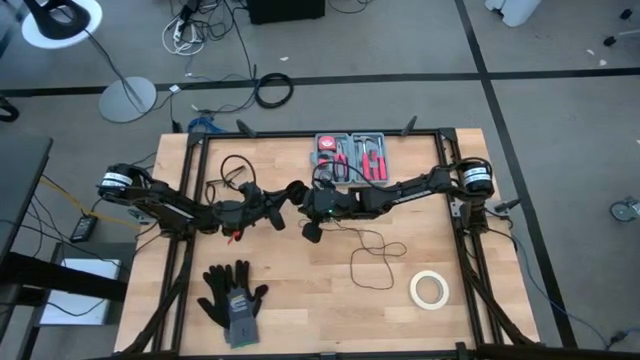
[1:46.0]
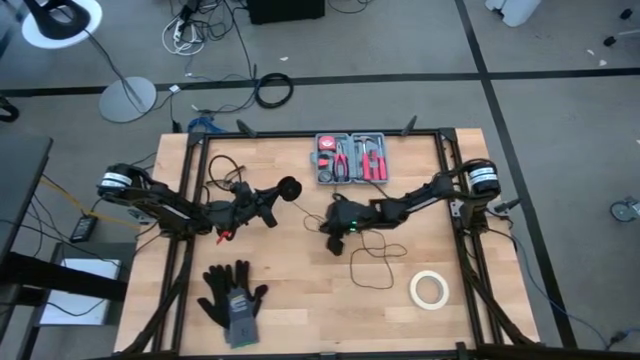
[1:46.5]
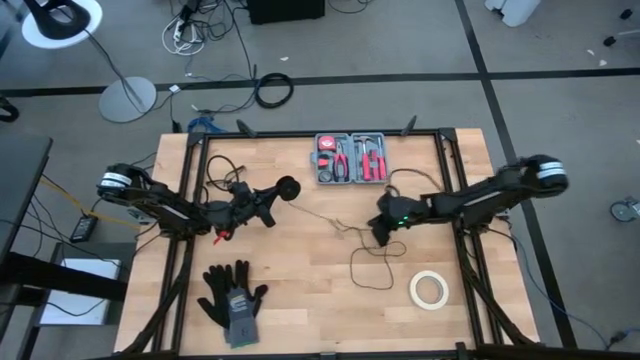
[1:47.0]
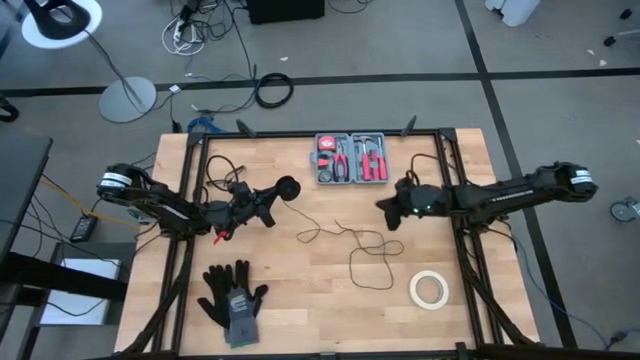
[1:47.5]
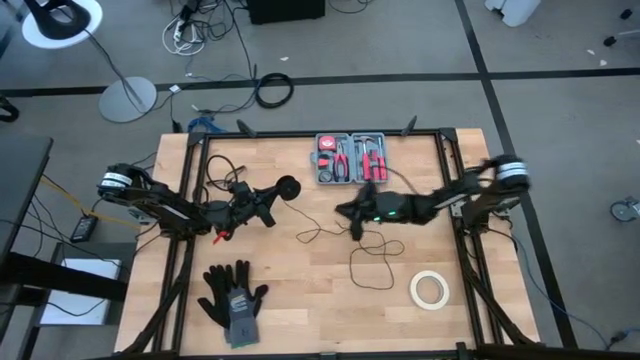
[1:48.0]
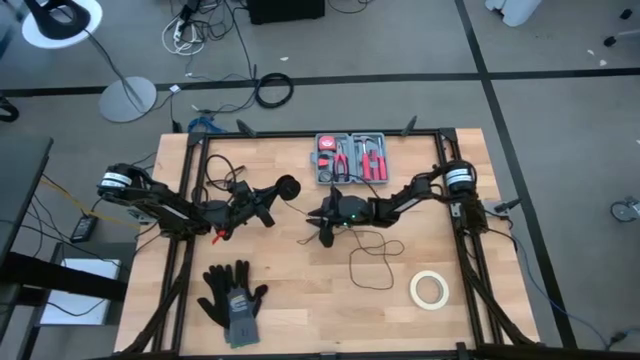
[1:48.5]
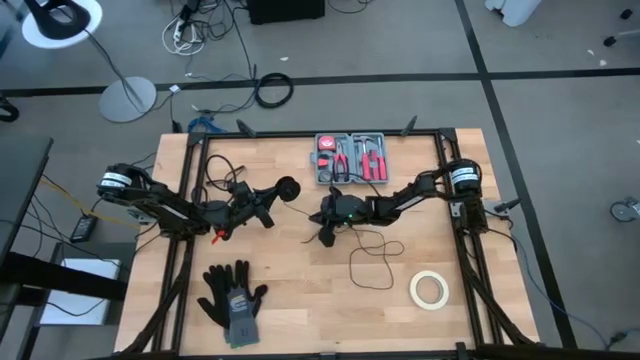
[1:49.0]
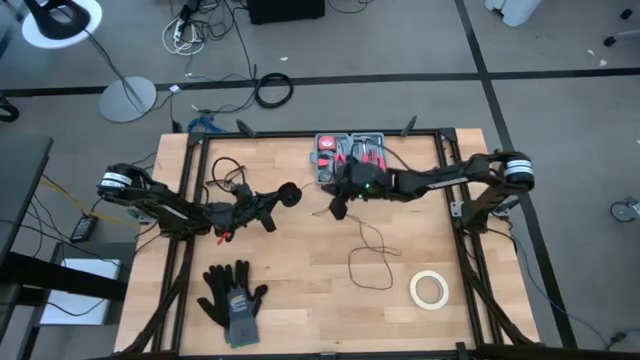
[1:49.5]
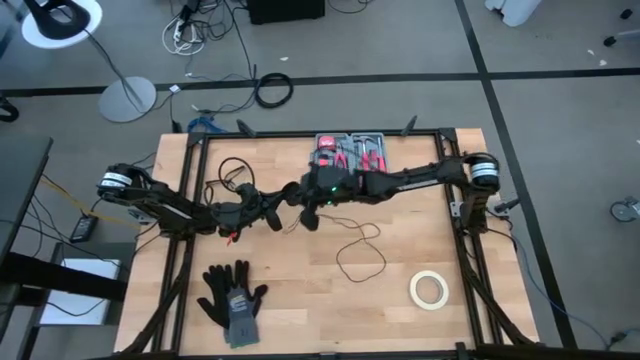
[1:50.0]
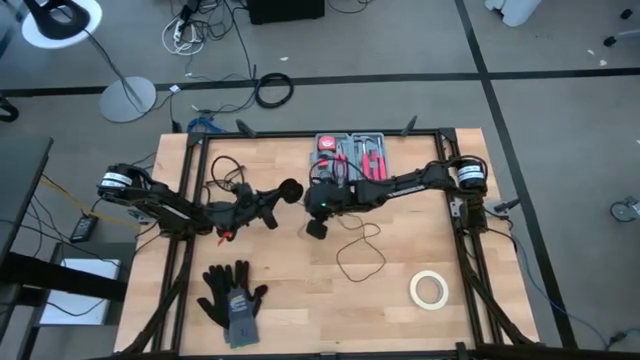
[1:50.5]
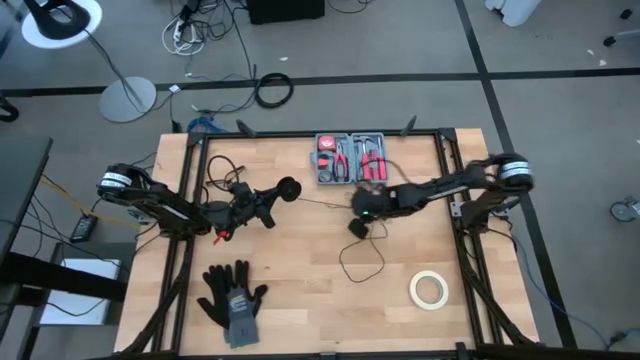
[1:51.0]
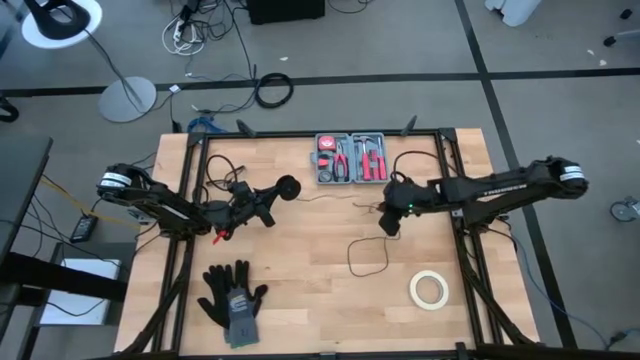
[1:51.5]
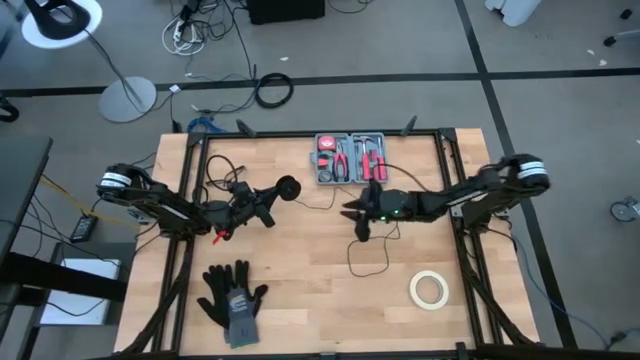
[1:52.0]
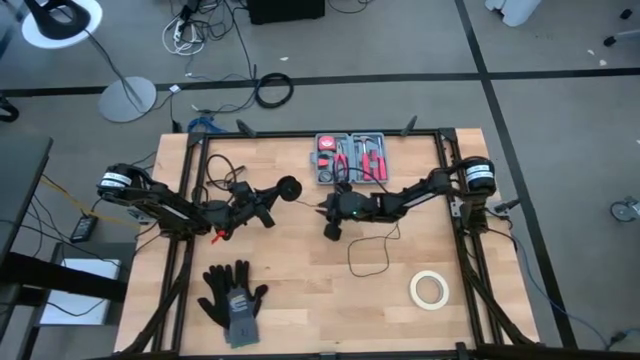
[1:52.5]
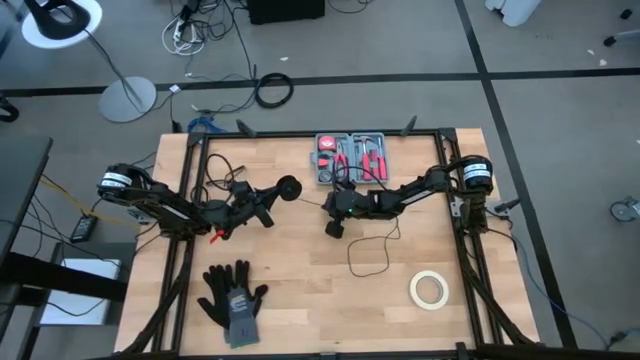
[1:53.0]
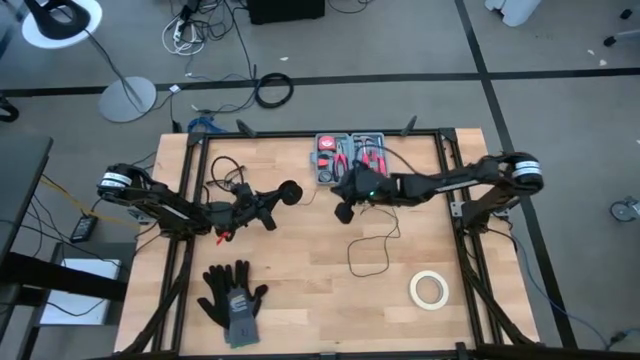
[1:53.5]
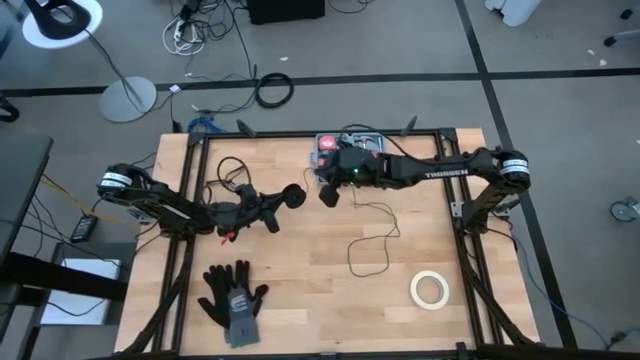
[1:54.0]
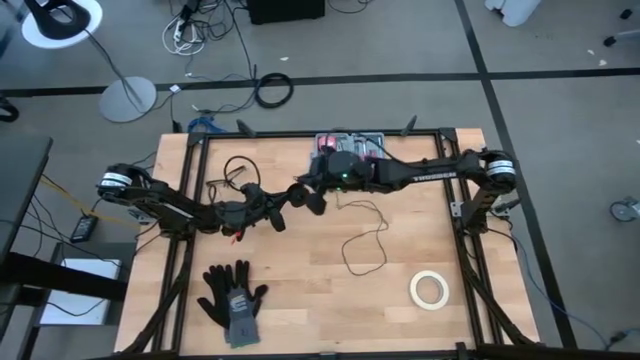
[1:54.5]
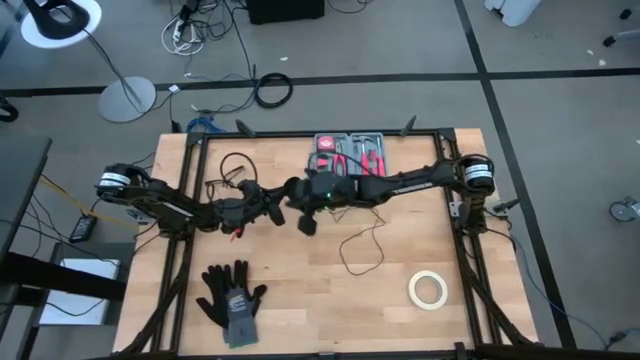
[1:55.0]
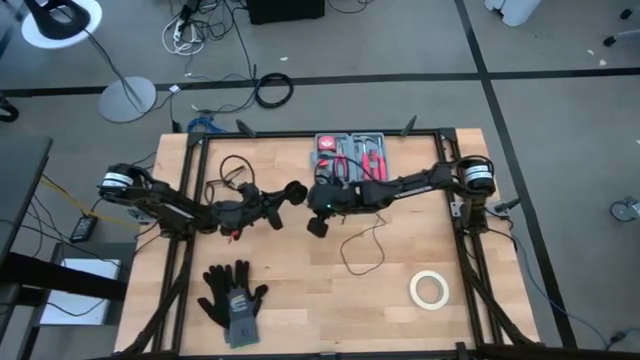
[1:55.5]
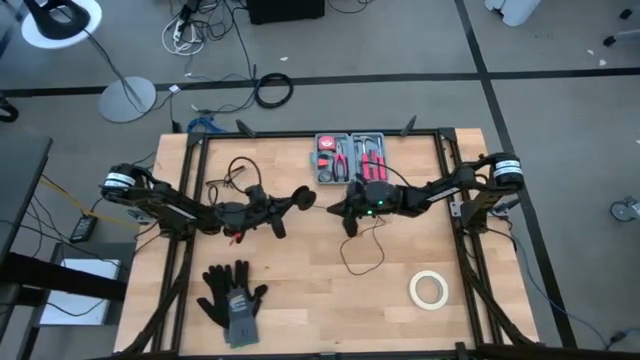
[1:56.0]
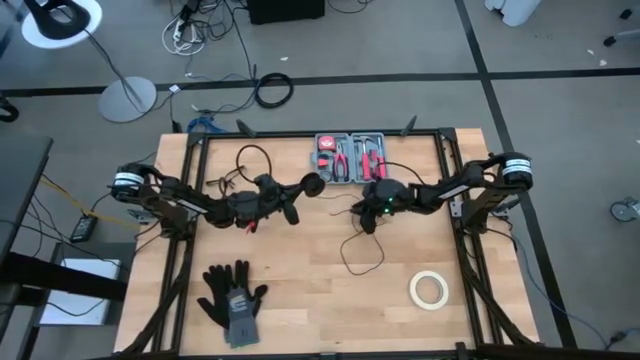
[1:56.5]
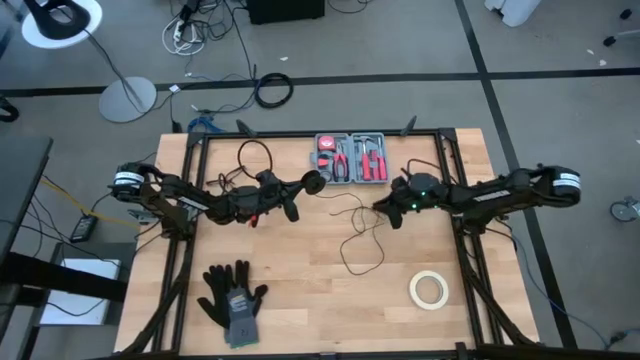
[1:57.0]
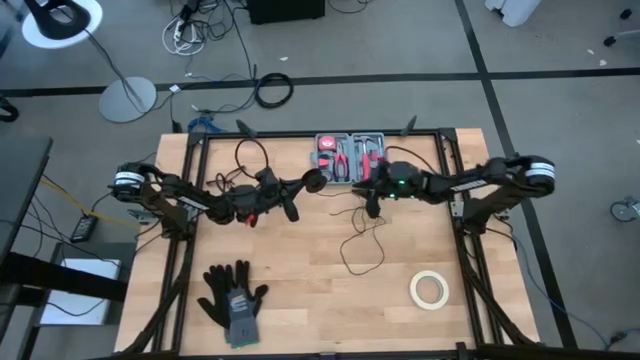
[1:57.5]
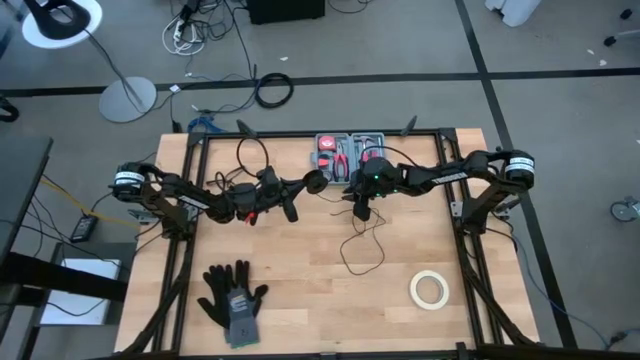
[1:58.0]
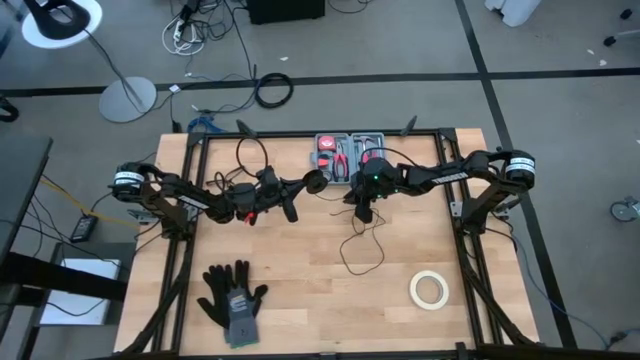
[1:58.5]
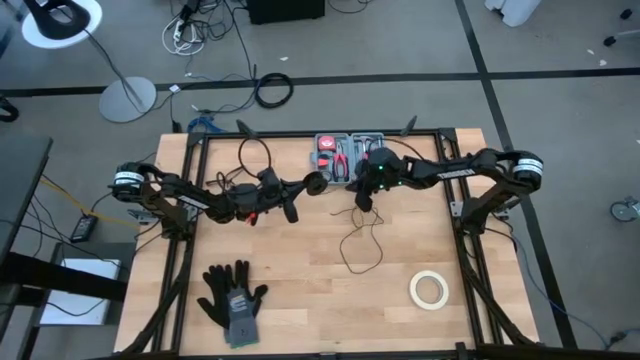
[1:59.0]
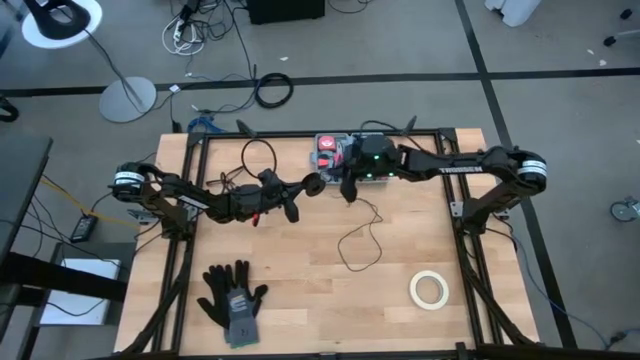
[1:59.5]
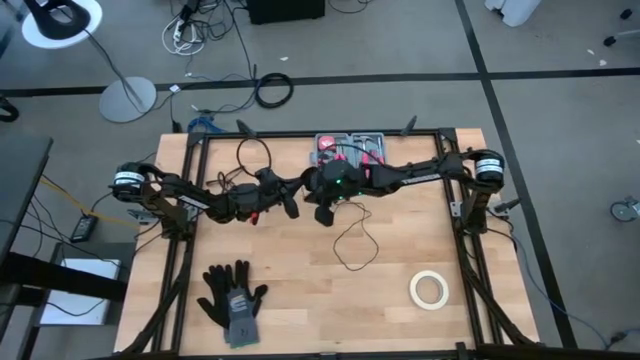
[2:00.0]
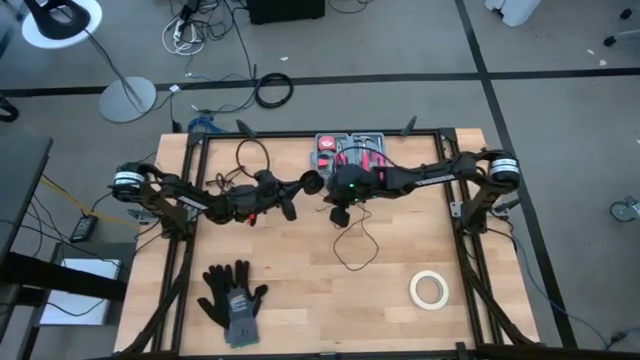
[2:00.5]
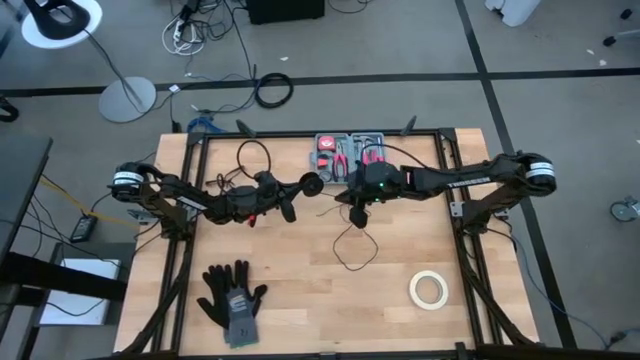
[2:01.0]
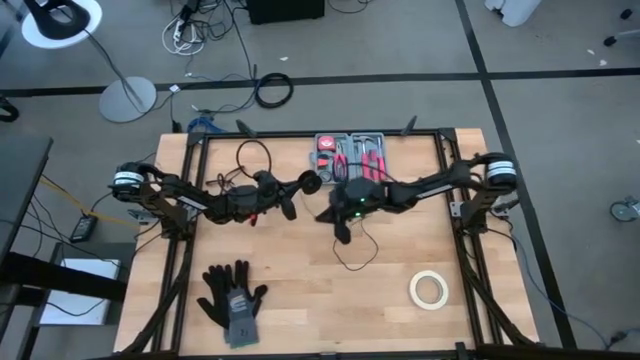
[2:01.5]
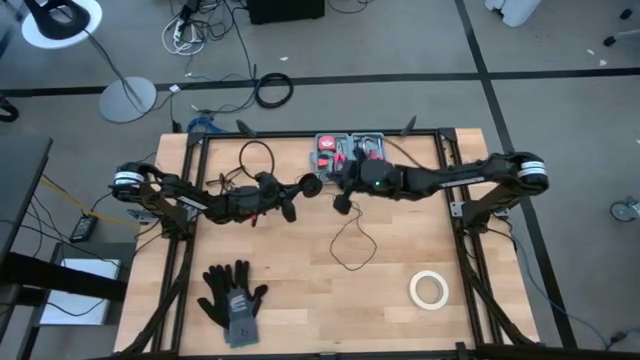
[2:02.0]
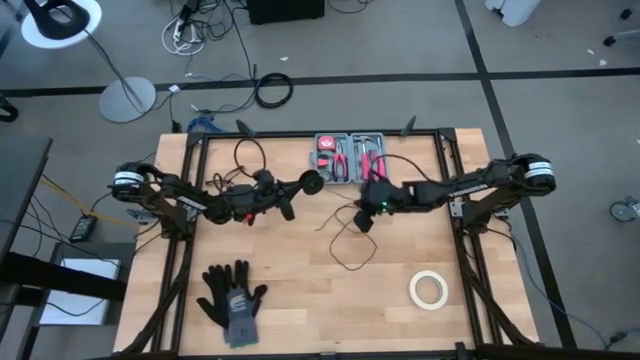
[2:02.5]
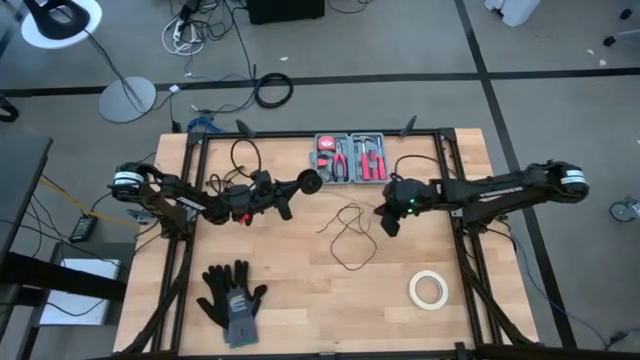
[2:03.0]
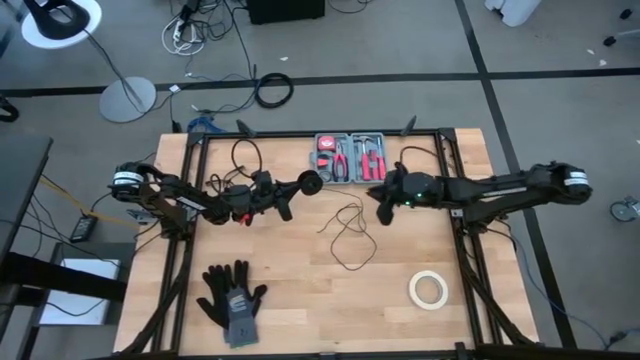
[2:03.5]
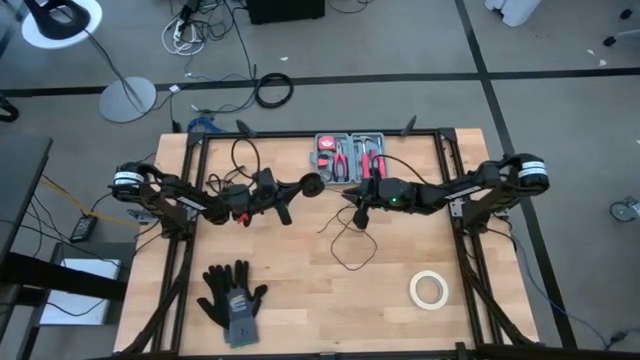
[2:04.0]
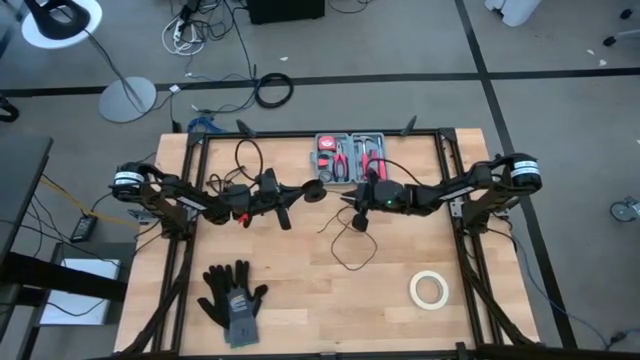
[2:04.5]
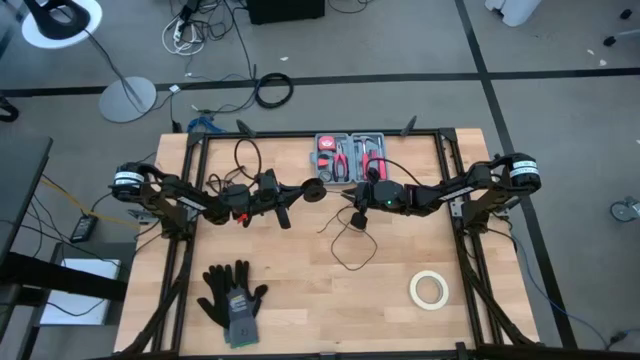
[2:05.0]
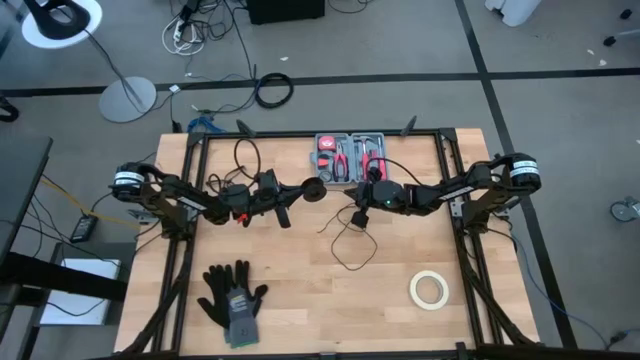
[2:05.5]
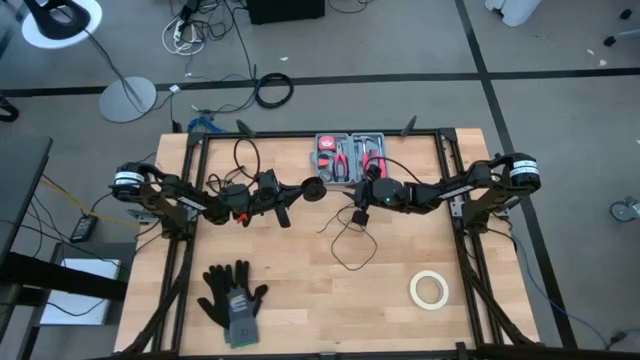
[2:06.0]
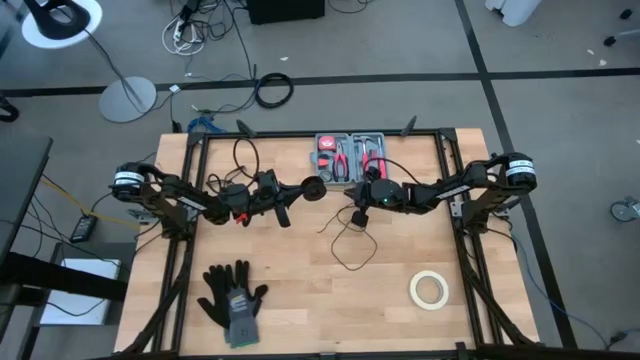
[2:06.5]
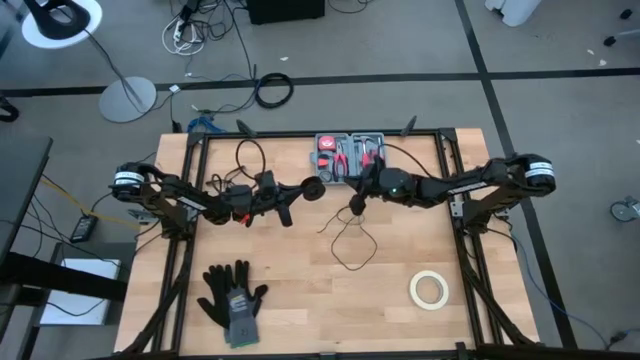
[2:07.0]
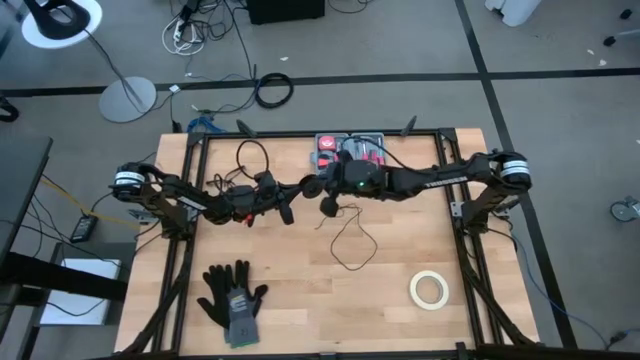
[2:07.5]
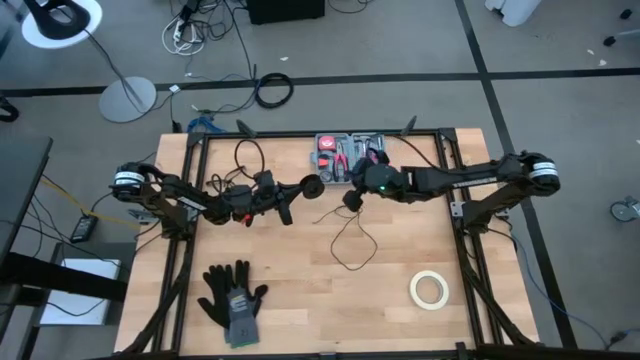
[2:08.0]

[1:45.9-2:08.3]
Task: Coil cords
Coil the black wire onto the black spool
